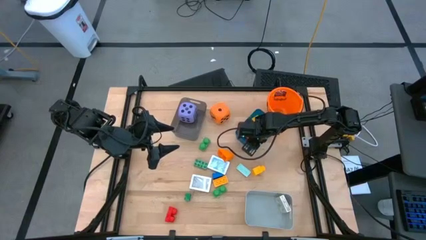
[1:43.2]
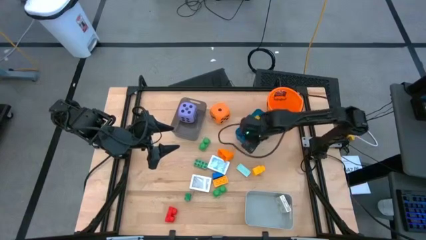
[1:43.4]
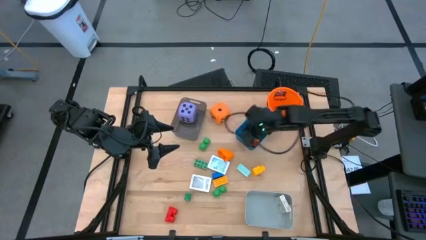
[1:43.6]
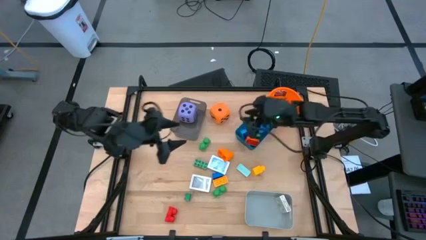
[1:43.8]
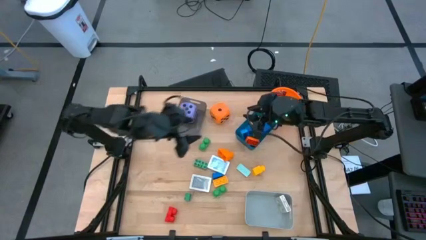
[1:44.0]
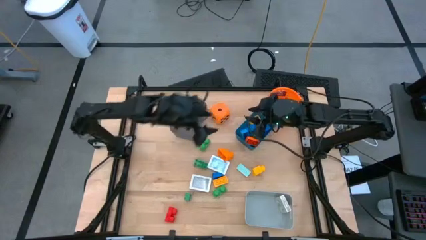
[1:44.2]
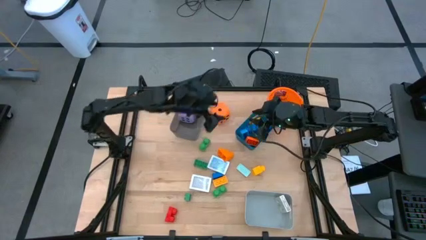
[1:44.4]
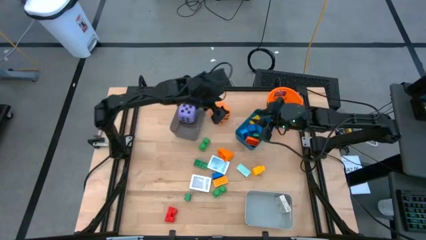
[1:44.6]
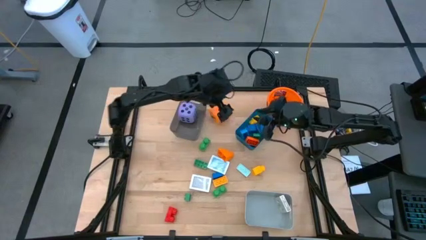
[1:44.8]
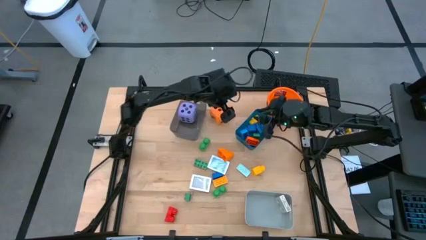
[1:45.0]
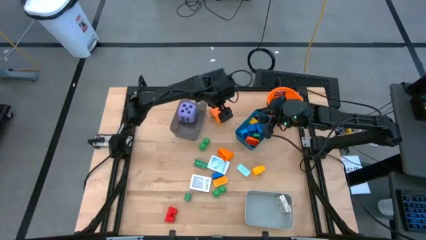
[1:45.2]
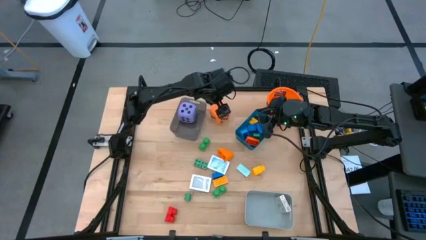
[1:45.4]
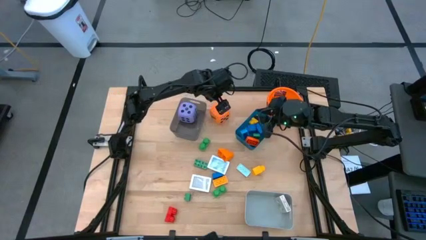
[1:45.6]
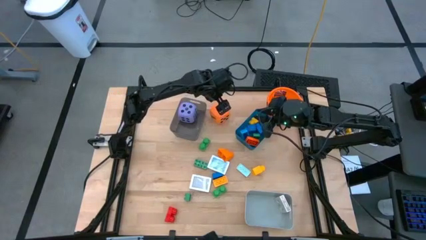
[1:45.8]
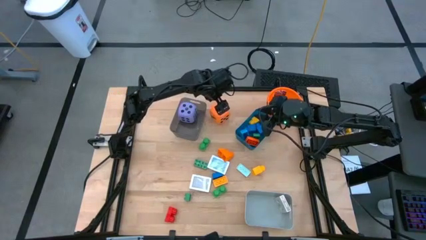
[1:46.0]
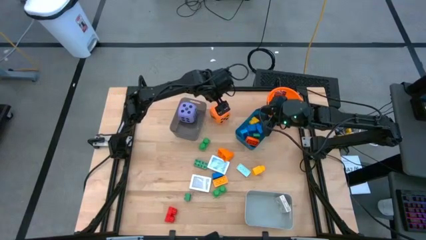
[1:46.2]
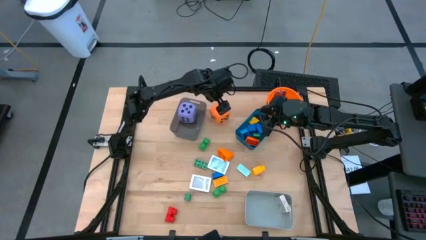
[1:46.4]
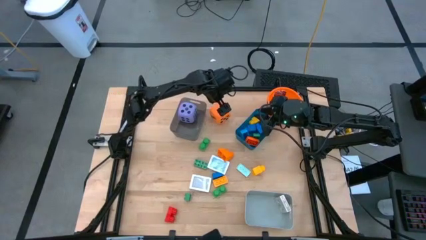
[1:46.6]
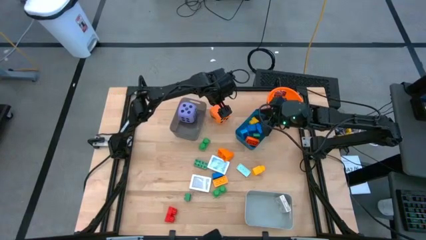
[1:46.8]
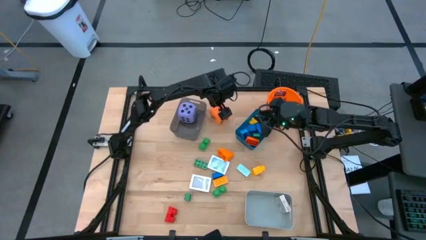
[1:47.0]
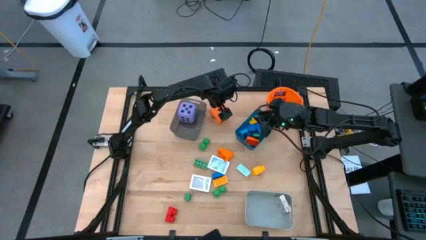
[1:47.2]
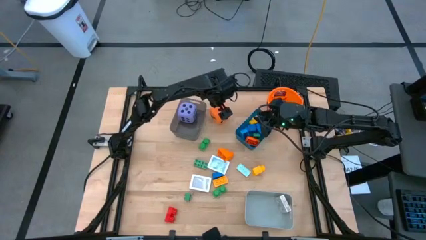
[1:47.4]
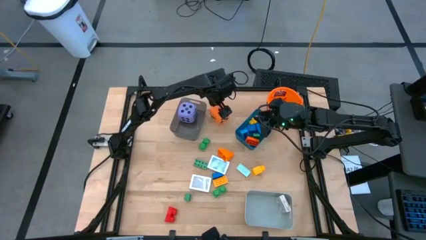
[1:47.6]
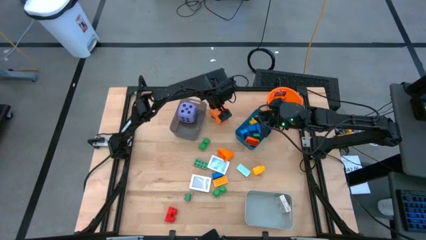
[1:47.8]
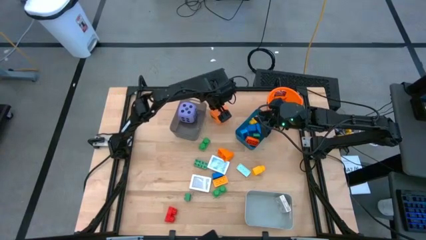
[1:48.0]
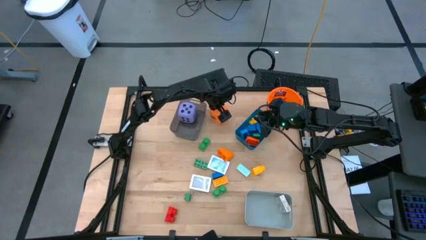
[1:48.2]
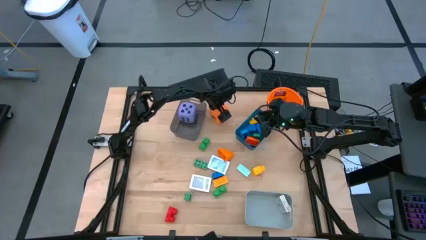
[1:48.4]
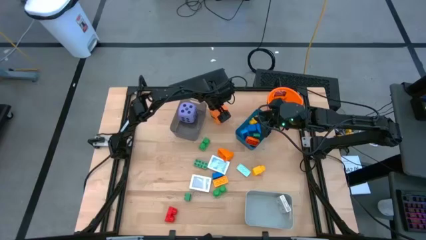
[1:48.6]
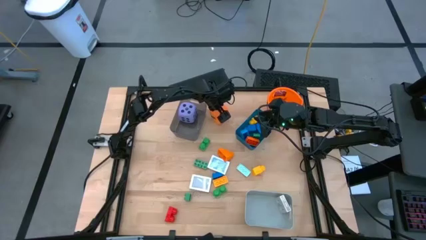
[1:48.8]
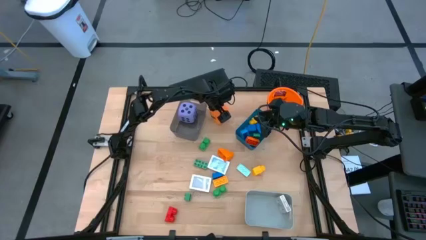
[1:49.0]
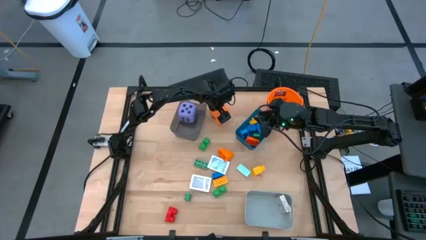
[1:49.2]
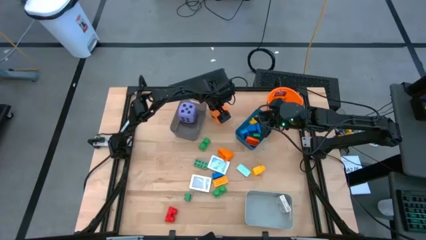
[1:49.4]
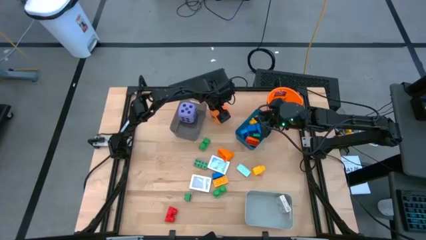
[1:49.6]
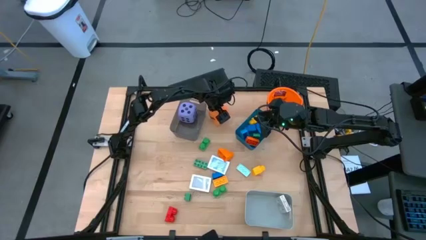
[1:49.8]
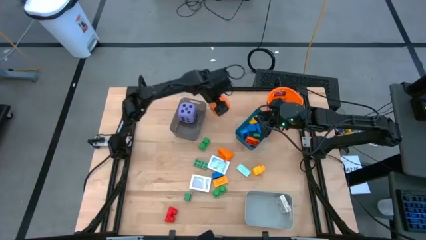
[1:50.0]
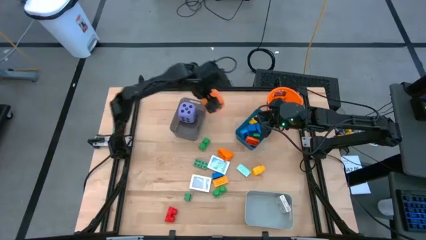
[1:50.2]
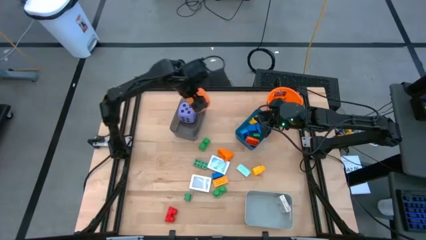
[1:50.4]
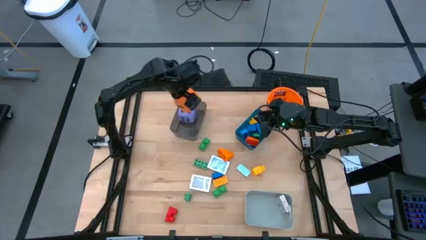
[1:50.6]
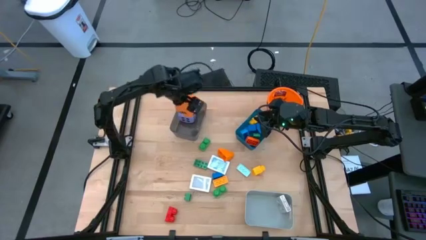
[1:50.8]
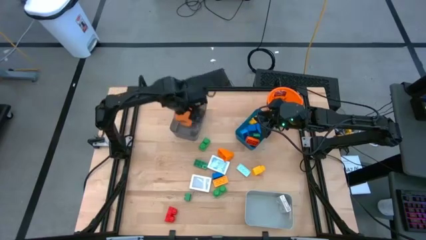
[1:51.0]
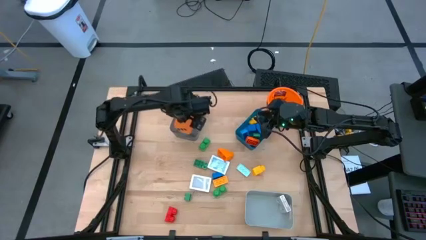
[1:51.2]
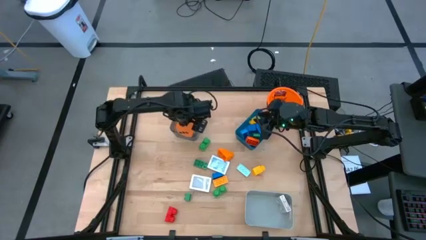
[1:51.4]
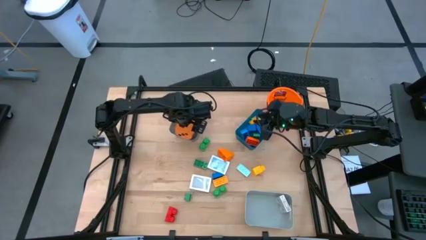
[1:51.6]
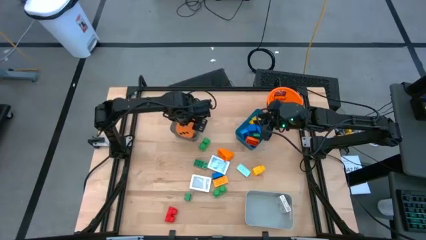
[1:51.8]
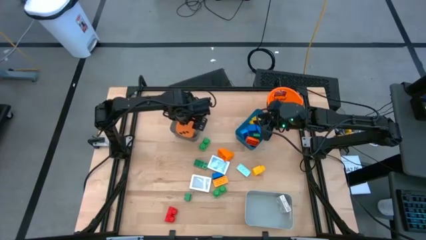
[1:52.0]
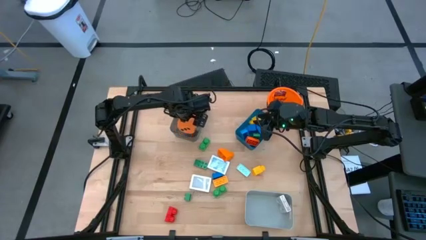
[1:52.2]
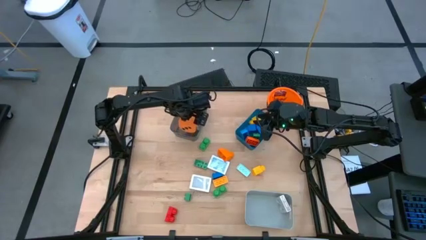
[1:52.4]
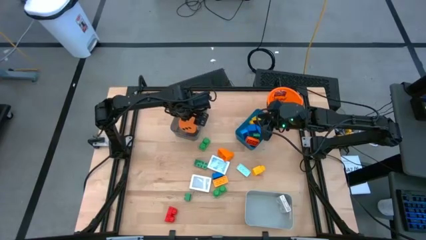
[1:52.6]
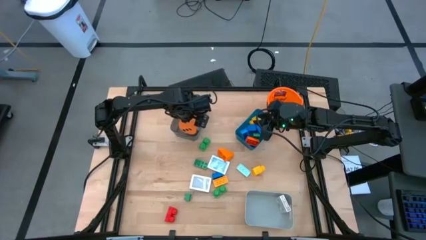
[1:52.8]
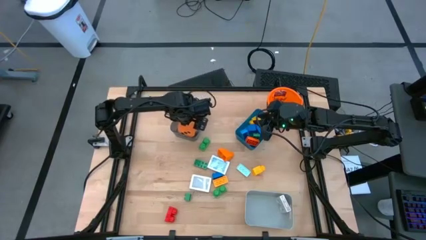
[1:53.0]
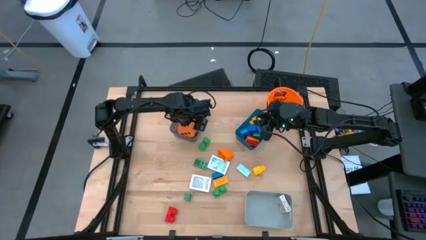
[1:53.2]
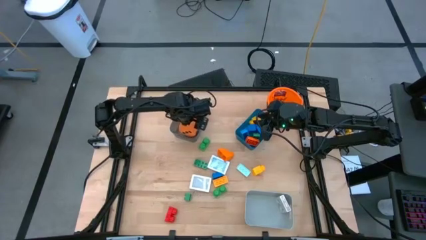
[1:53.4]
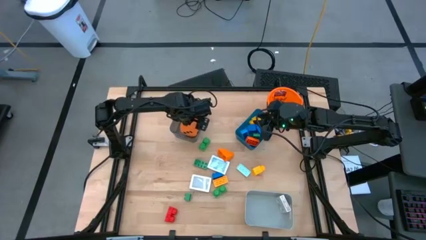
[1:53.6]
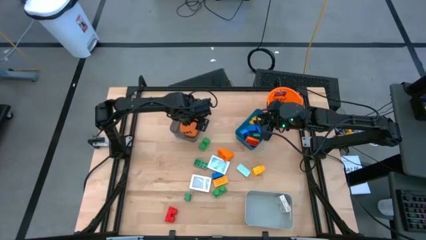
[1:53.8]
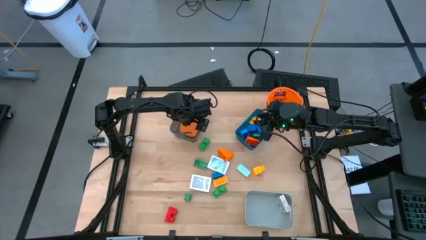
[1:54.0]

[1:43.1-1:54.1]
Task: Pick & Place Toys
Put the orange dice into the black bin

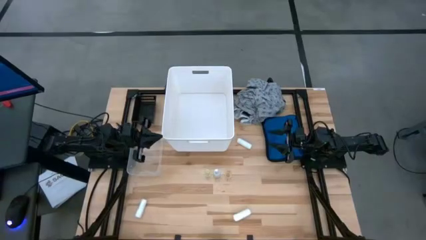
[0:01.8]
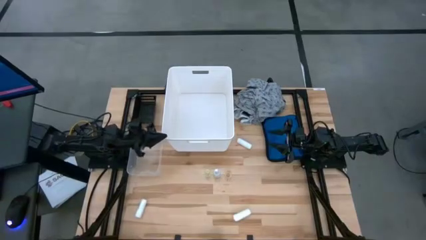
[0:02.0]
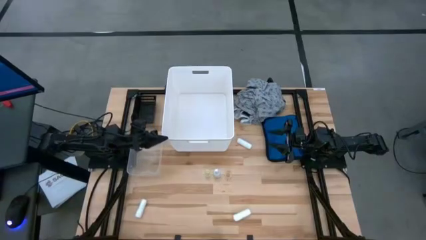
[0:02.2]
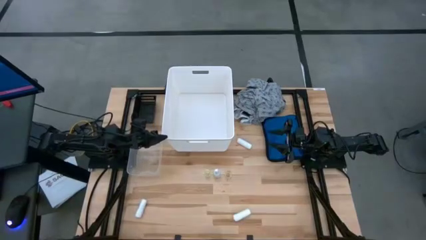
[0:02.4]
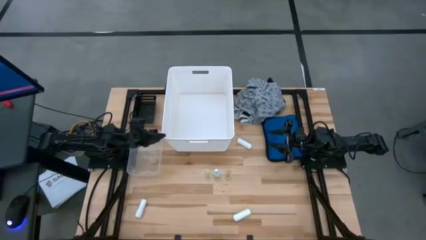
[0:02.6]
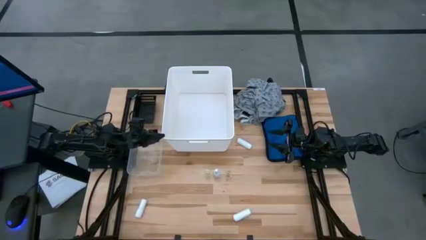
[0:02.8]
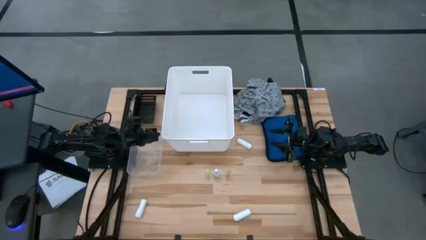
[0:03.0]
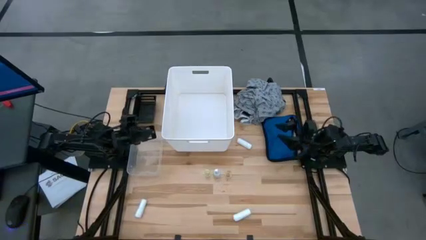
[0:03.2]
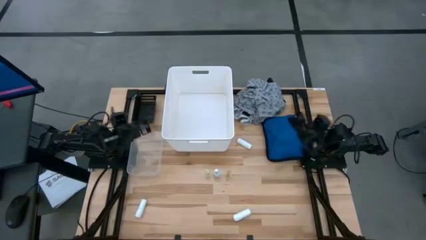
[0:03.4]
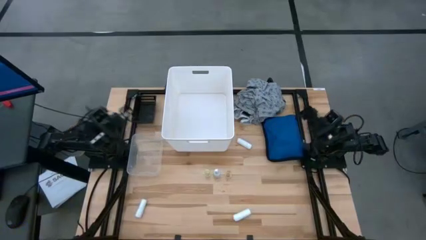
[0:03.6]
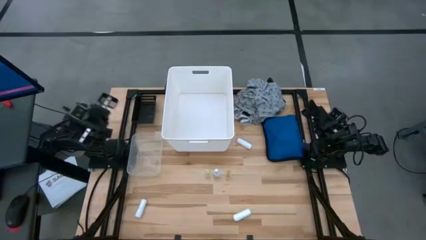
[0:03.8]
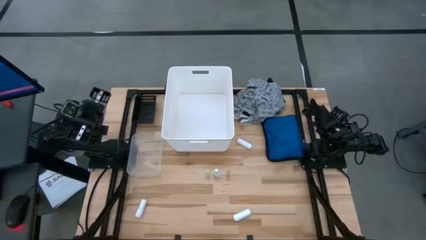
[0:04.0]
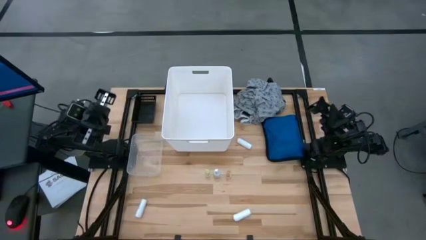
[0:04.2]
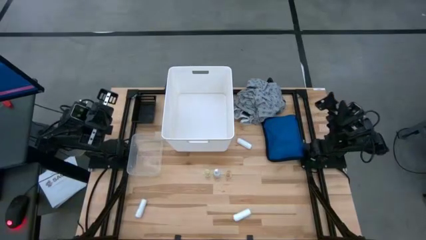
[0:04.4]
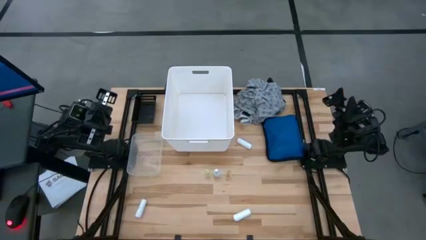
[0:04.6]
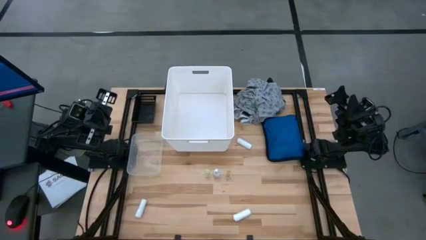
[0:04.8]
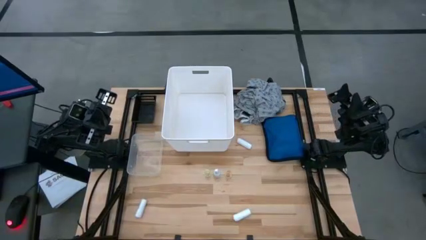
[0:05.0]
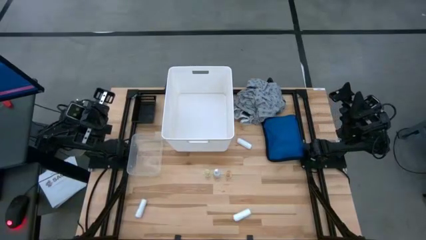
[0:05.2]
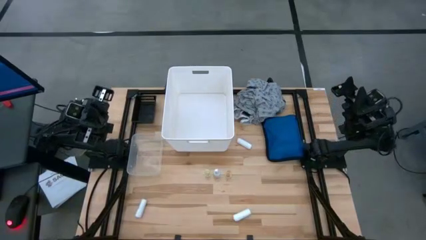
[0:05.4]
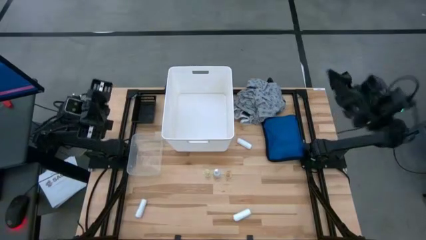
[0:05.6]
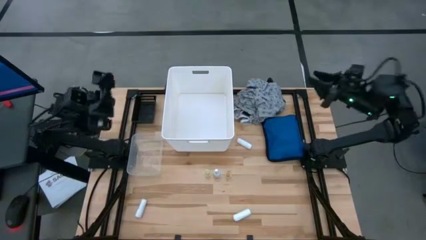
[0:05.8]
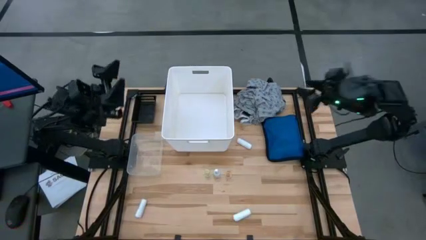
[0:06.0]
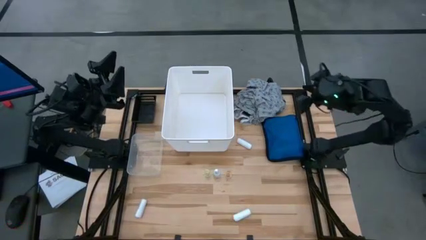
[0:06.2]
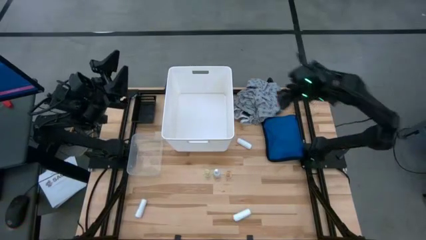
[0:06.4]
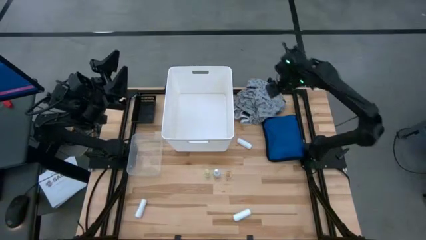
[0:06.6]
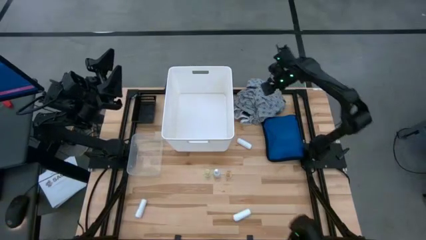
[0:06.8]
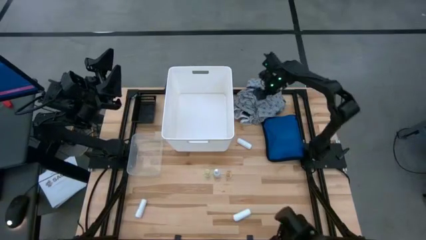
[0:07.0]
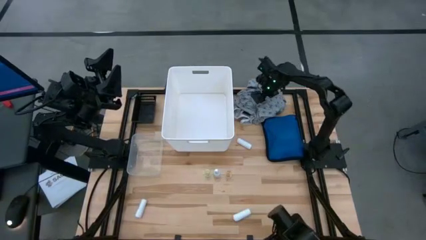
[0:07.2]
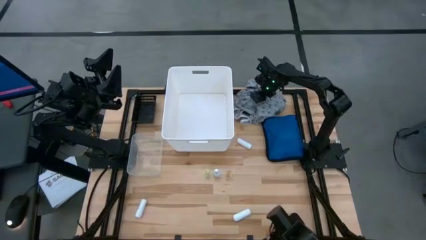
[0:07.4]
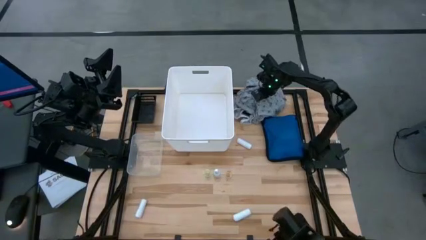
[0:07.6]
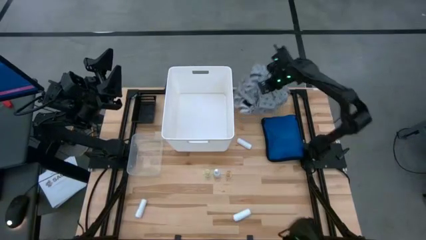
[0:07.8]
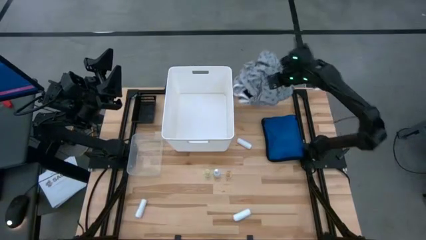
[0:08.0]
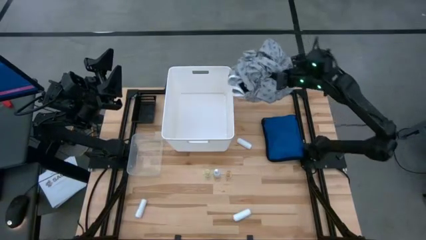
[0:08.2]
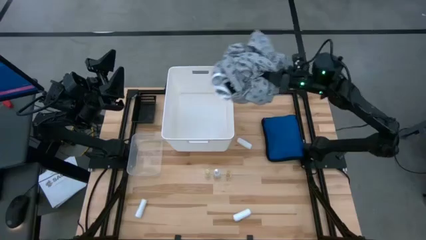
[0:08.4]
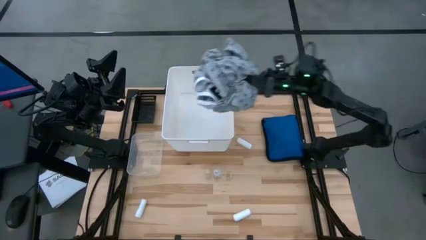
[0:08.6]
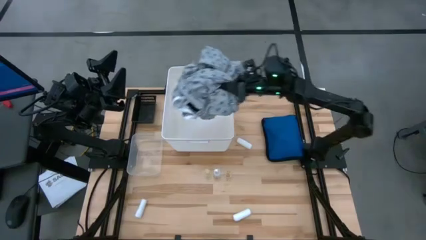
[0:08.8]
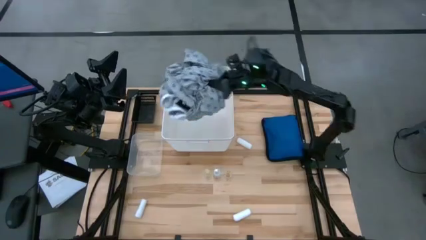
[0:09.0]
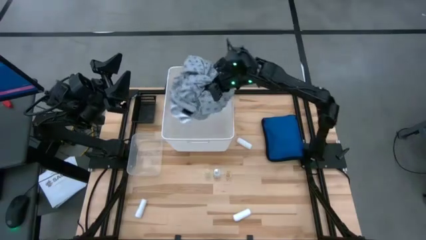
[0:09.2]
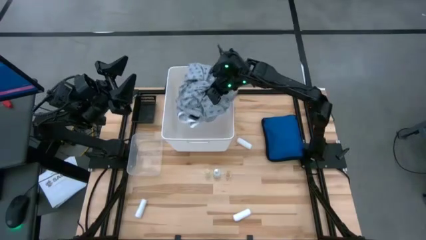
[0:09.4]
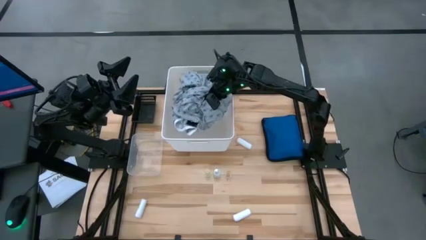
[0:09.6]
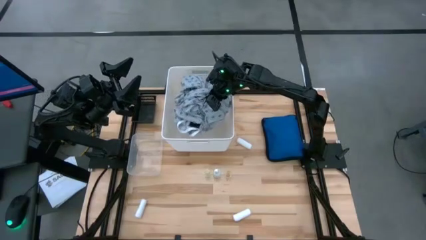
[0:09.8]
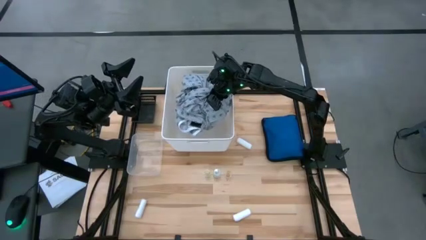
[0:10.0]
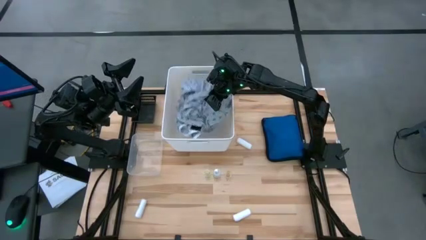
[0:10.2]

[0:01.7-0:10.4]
Task: Pick & Place Medicine items
Put the patient gown into the white bin
